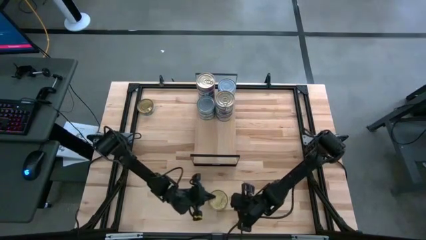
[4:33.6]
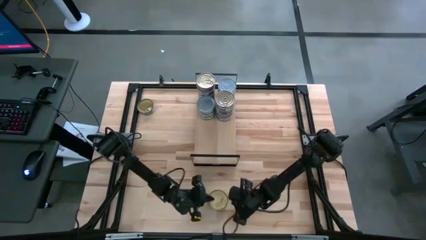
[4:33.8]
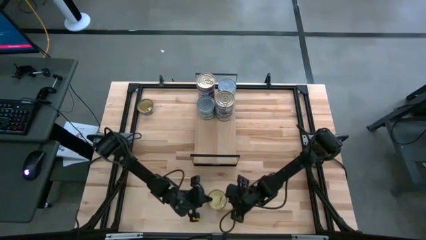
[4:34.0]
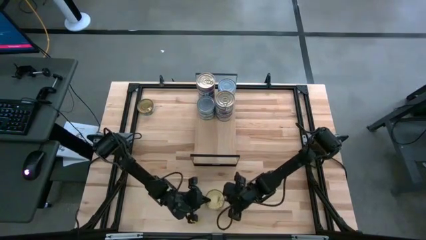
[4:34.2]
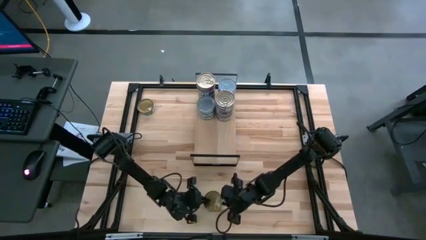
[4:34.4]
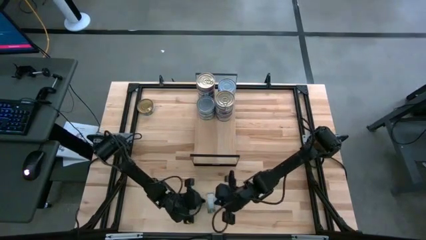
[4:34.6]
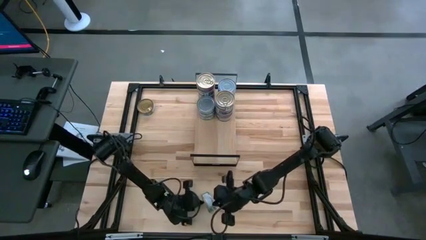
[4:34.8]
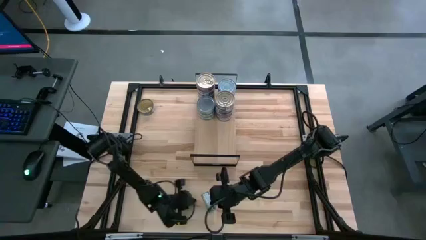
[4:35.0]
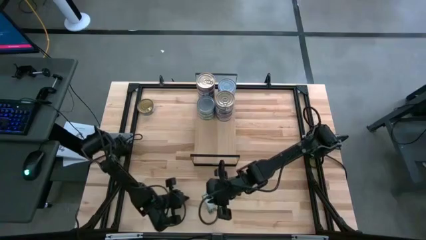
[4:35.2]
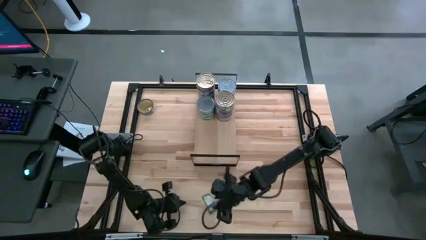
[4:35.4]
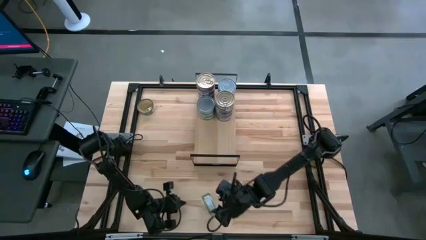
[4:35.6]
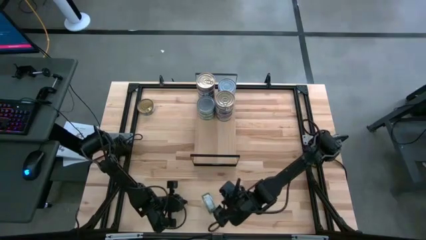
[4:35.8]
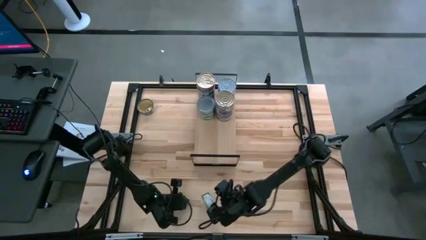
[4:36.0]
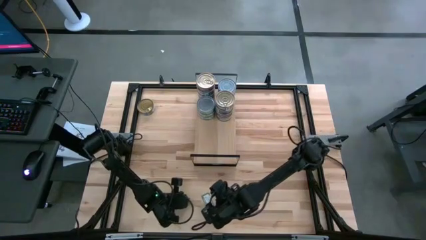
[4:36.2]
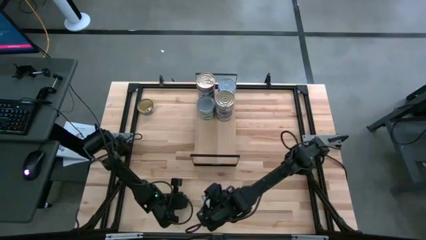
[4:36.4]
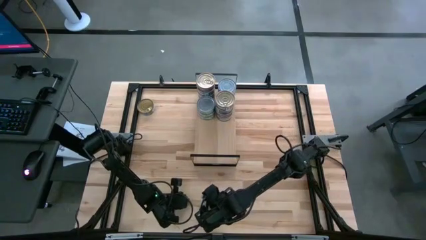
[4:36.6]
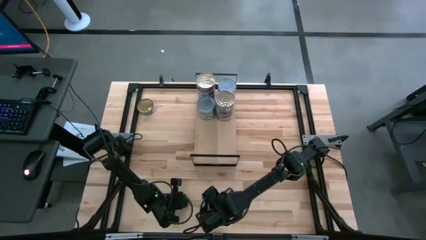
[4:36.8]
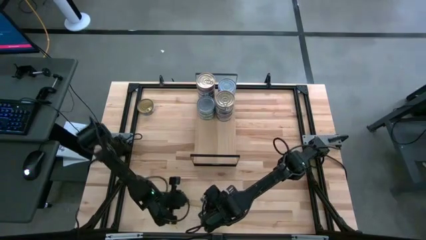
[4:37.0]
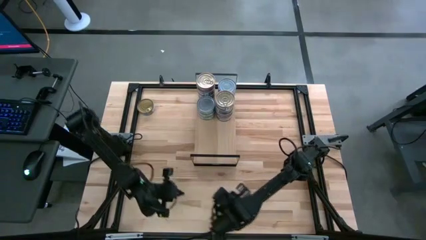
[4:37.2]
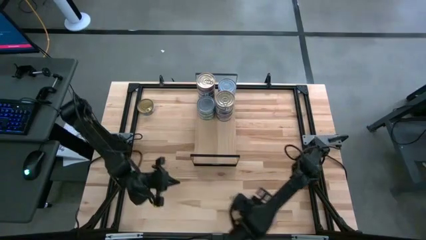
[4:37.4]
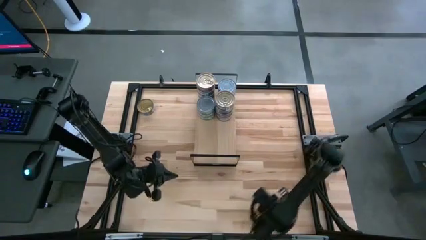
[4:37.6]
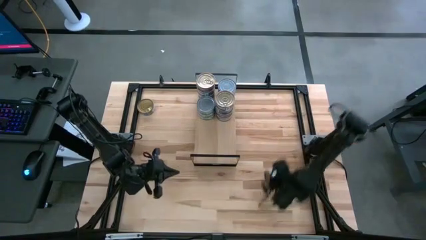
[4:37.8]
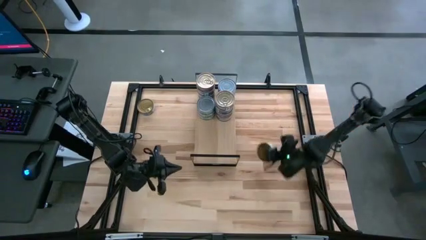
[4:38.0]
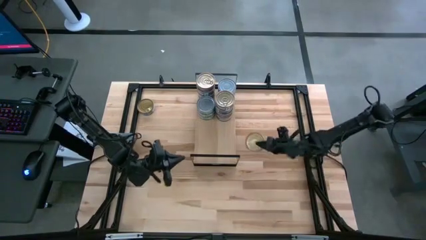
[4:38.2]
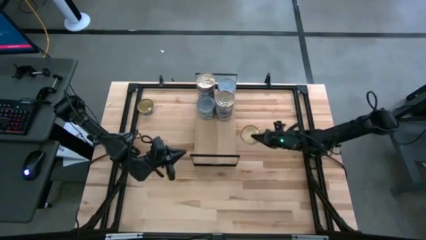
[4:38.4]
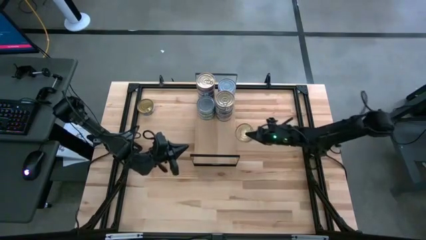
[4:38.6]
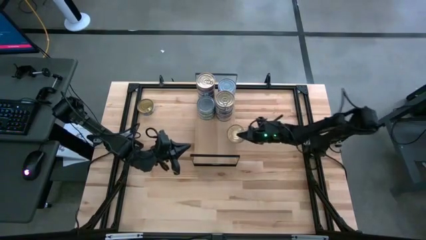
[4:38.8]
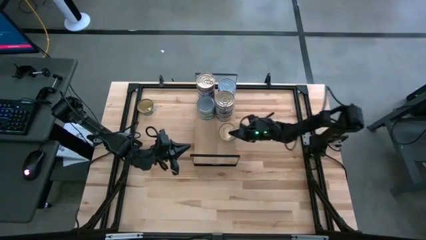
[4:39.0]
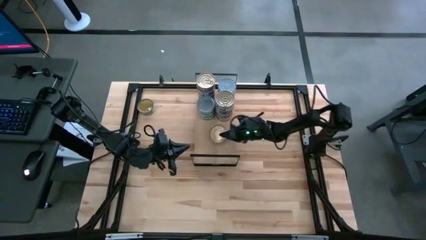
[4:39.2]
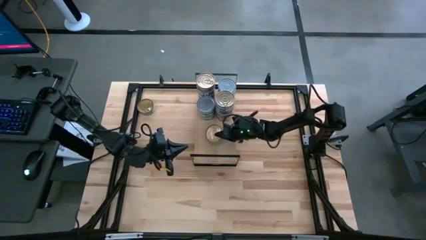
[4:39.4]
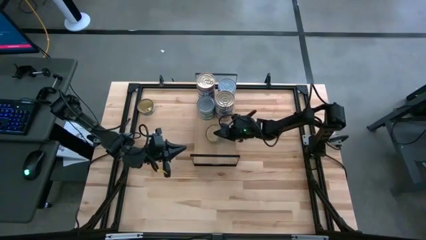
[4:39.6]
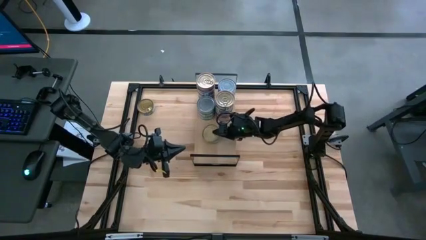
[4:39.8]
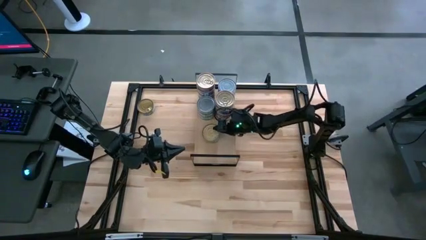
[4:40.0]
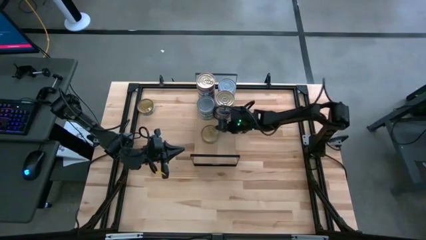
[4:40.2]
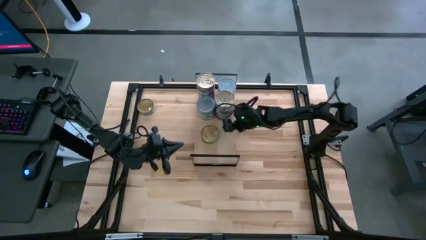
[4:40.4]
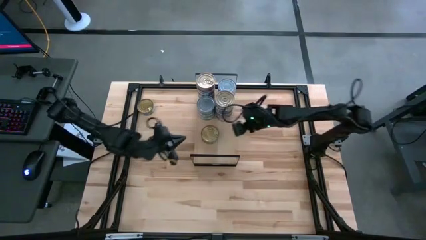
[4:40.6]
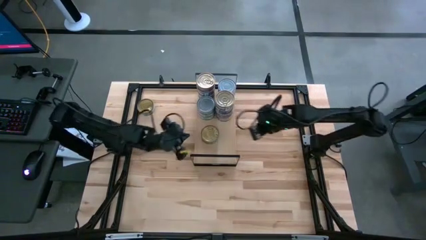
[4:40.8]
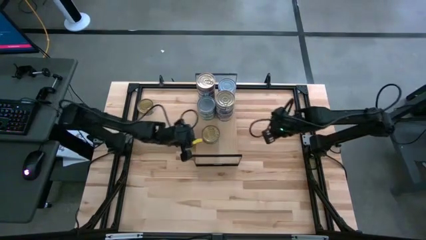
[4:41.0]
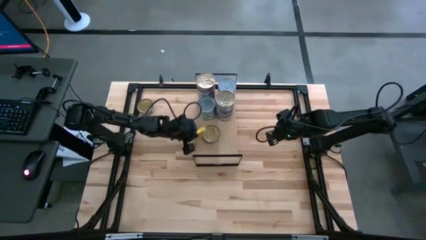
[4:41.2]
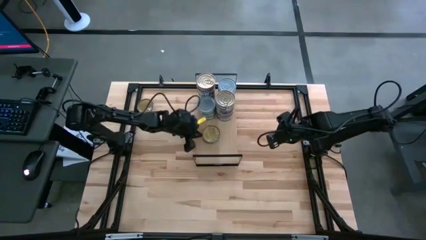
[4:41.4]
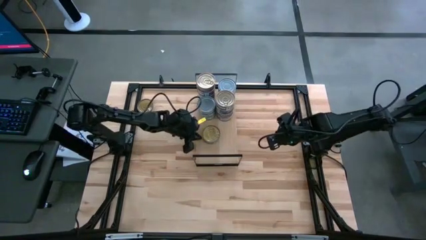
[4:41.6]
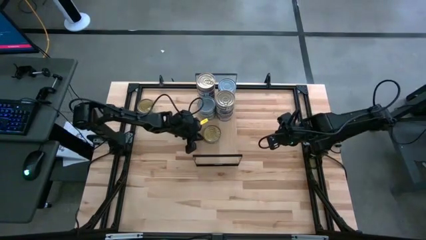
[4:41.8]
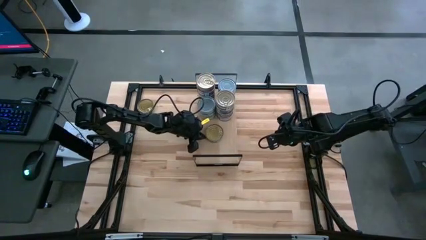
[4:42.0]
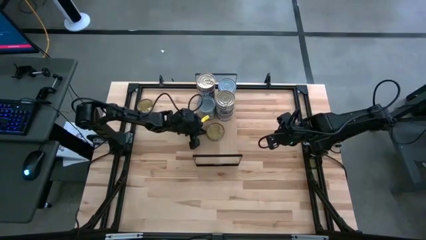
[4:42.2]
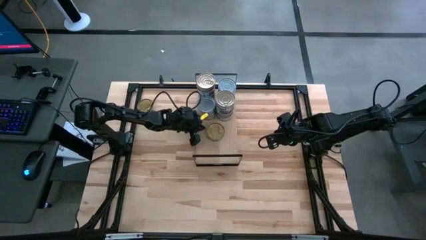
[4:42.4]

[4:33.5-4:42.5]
Task: Stack canned seafood by type on shelf
Put the green tuna can on the shelf

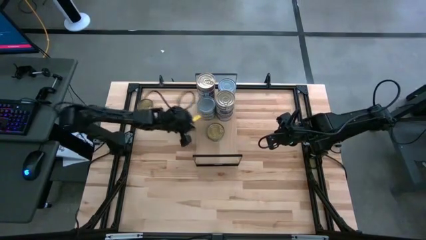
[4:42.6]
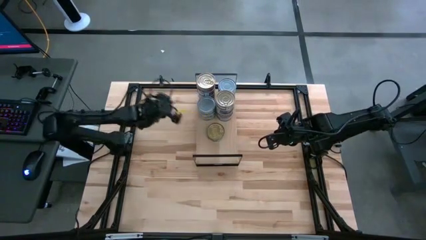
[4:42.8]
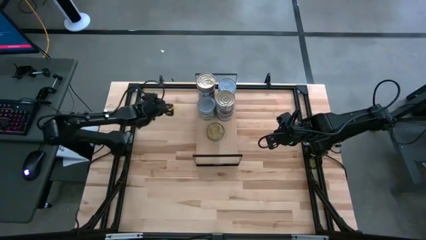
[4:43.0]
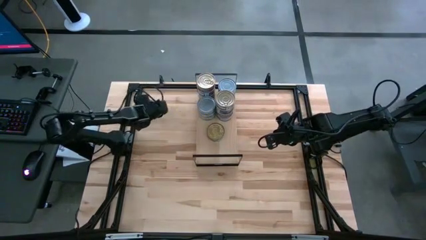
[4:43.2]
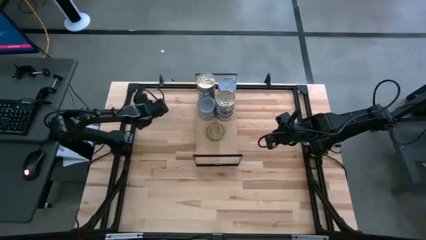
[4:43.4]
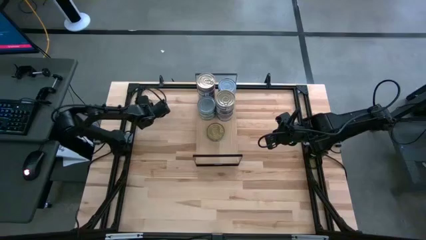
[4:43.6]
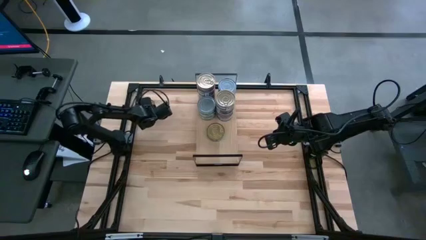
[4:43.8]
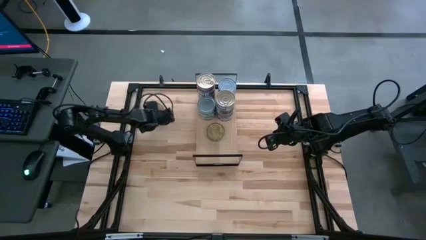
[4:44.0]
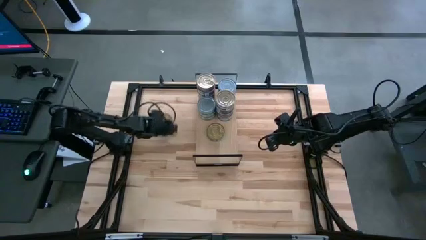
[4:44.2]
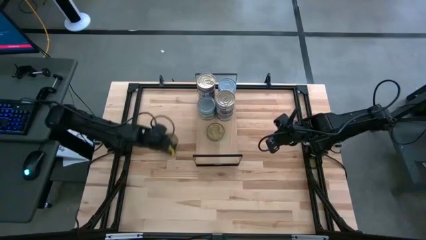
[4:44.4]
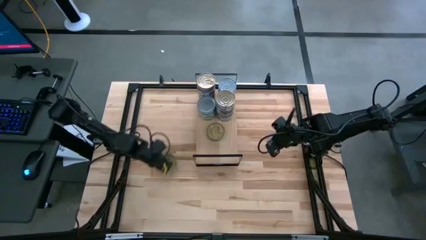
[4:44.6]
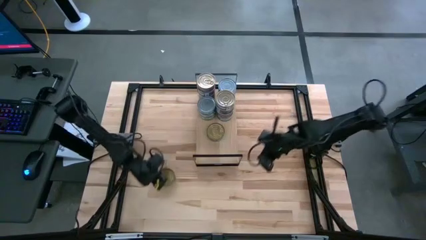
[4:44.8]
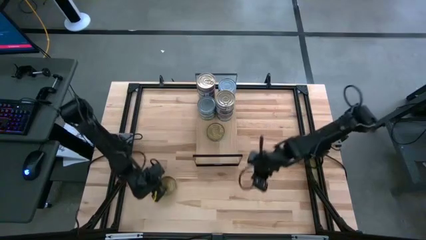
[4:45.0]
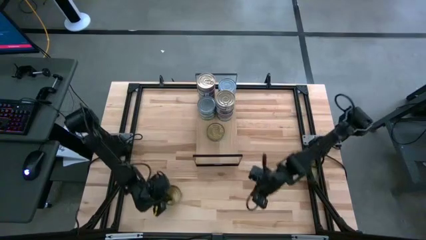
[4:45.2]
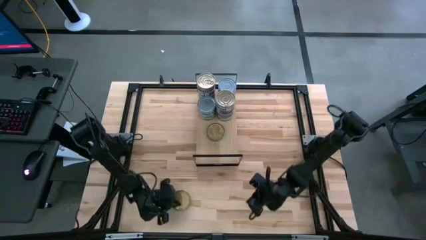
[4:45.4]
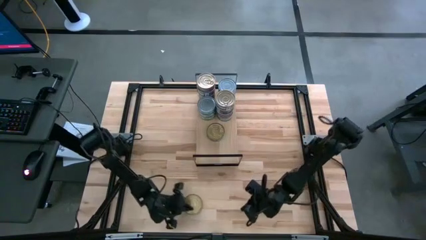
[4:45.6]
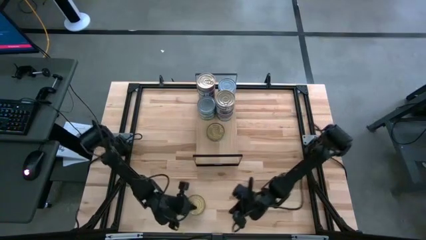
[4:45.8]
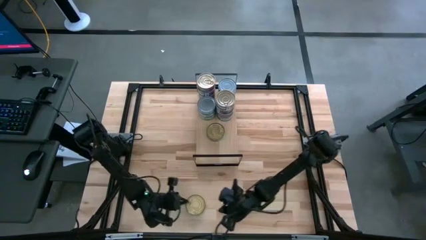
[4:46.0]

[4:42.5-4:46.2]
Move the green tuna can to the bottom middle of the table

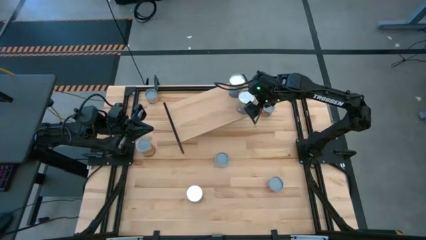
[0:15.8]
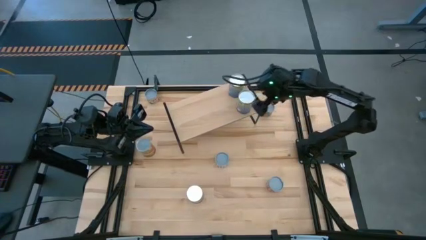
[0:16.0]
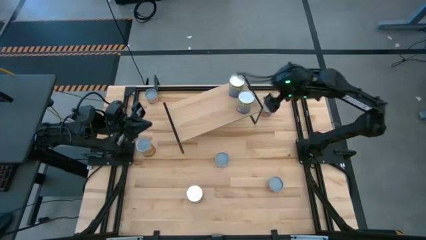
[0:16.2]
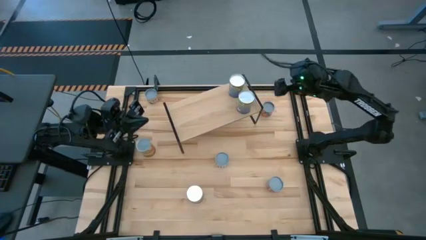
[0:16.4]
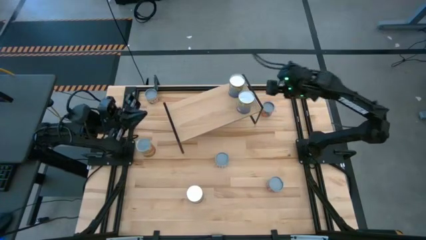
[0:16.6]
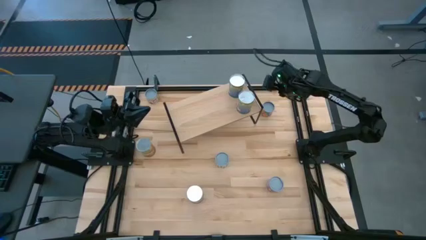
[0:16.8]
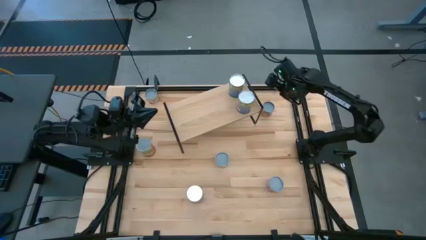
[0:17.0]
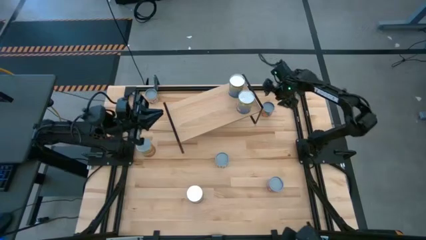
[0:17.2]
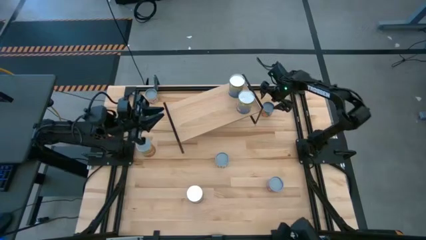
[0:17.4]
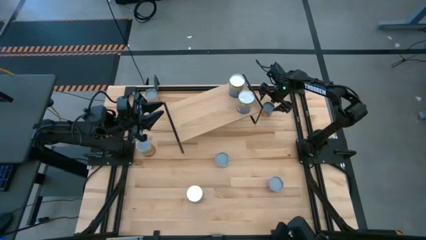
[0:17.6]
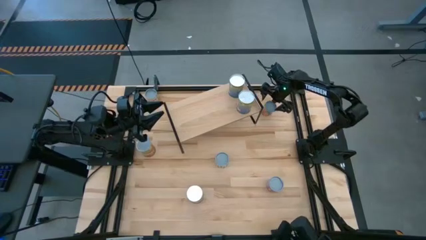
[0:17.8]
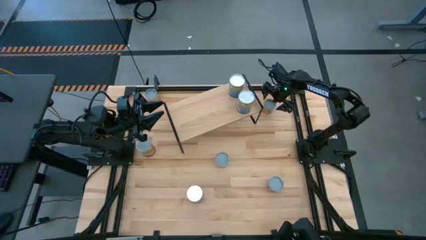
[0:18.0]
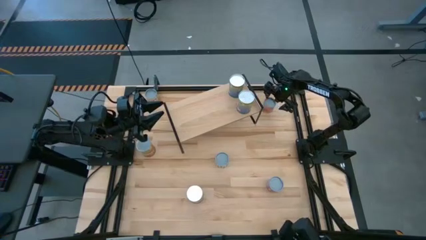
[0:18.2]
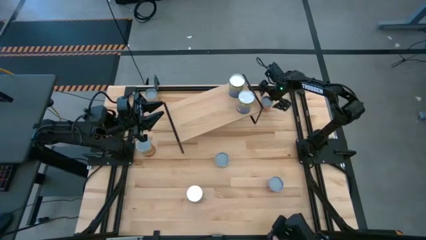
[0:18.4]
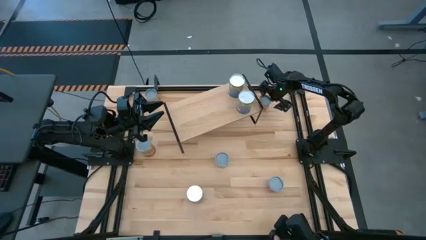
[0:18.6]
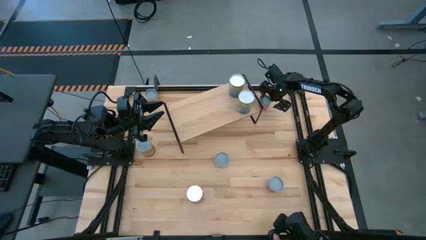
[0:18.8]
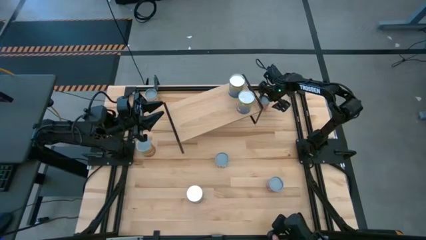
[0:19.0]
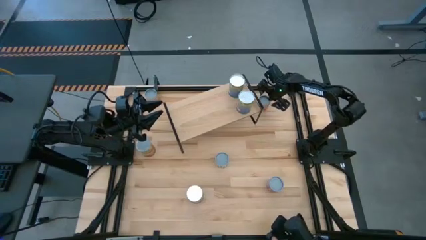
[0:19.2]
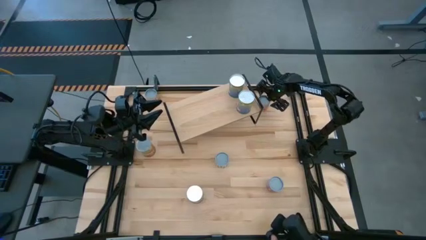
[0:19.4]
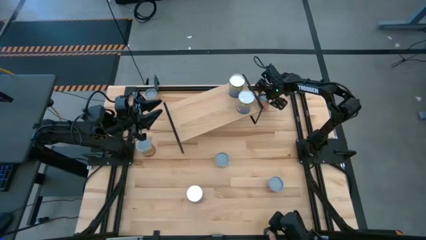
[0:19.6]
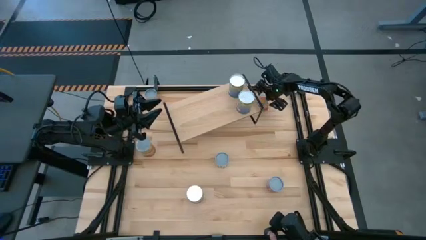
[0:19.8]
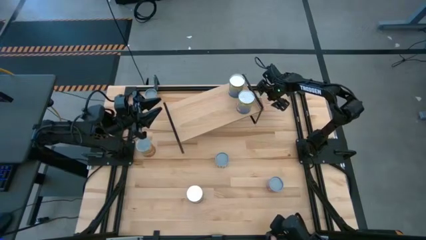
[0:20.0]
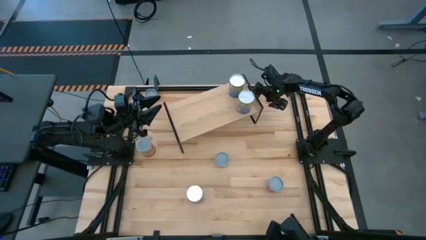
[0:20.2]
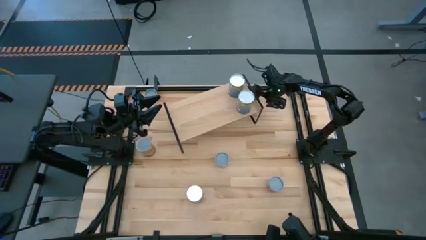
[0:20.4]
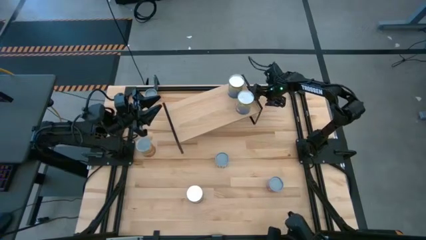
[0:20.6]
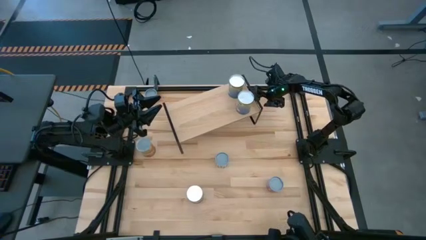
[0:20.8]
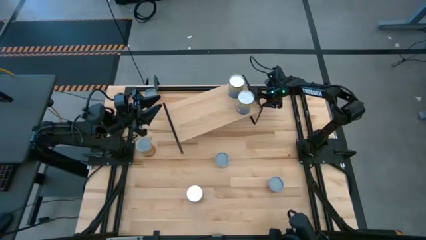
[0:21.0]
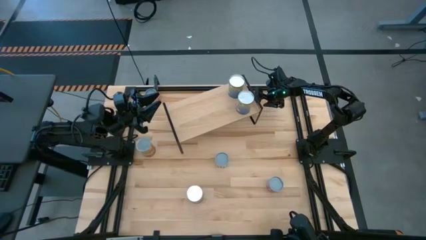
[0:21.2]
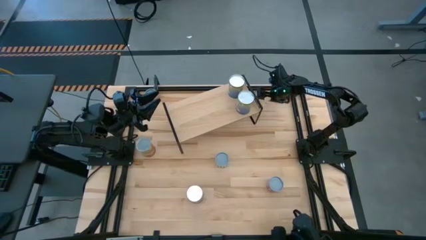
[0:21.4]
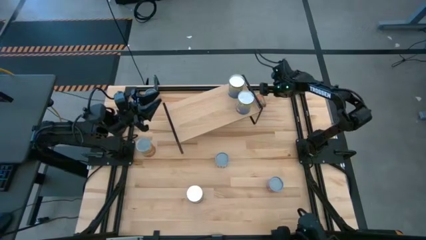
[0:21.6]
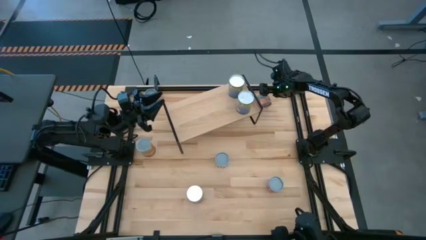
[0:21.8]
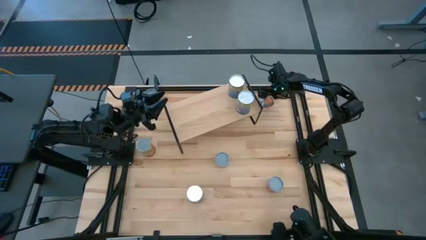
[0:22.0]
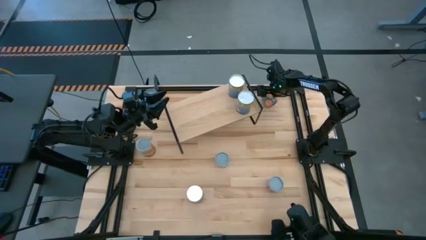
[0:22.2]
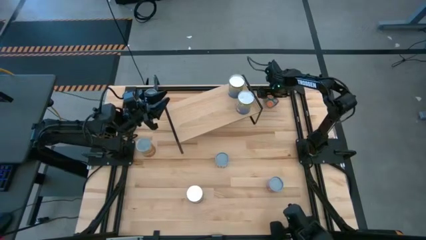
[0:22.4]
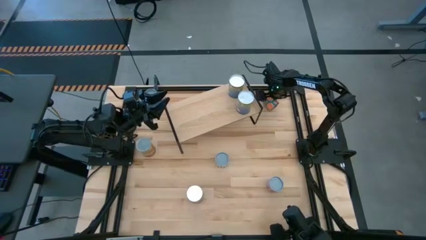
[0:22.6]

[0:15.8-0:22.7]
Task: Pick and place cans onto a shelf
Put the canned oranges on the shelf
